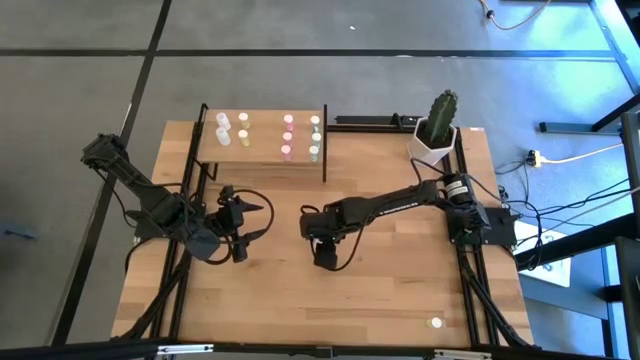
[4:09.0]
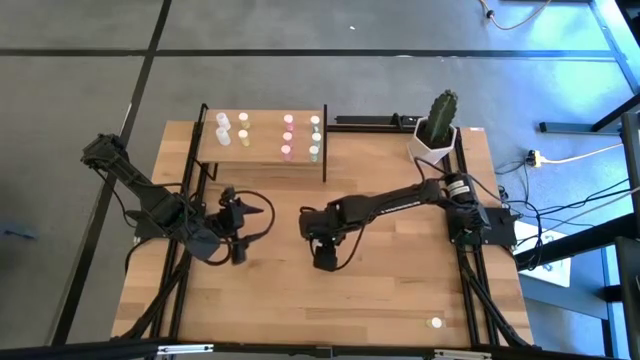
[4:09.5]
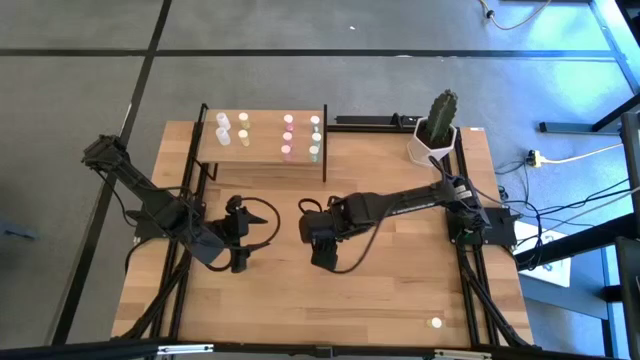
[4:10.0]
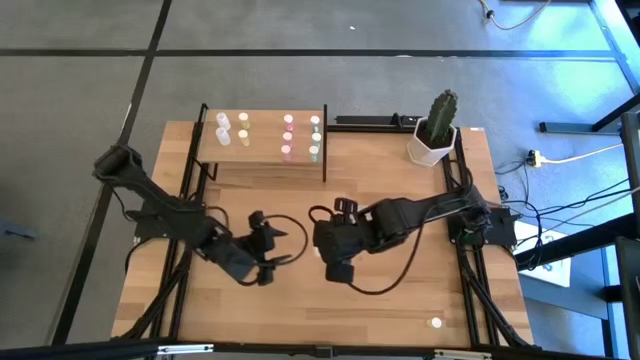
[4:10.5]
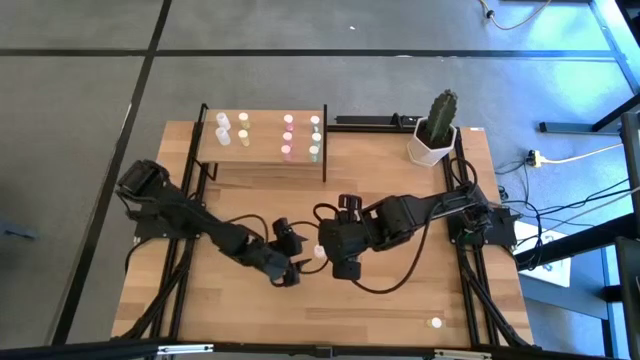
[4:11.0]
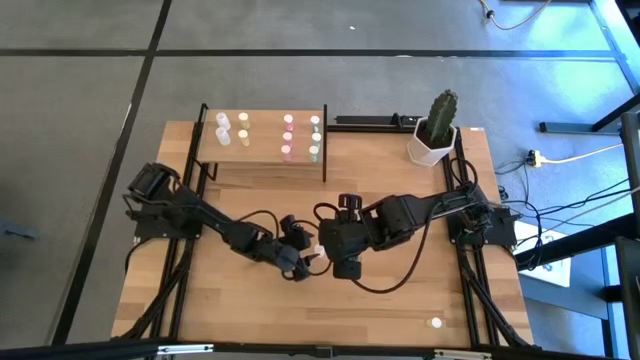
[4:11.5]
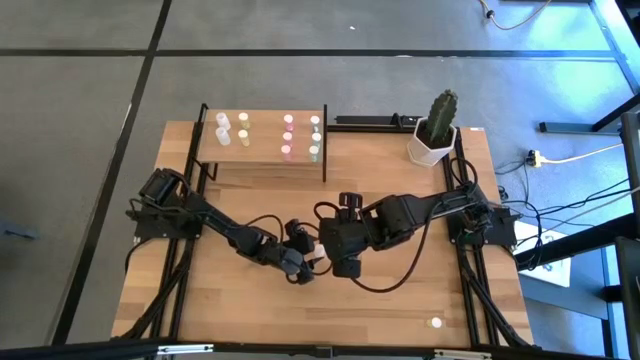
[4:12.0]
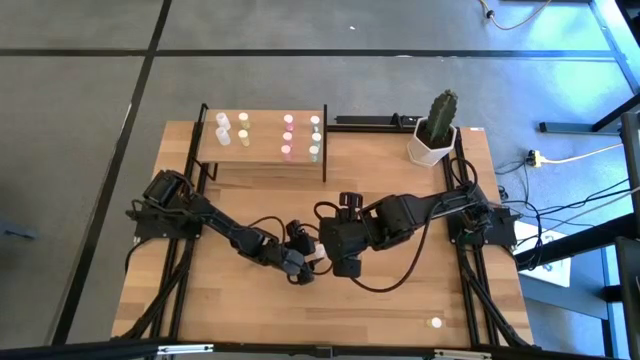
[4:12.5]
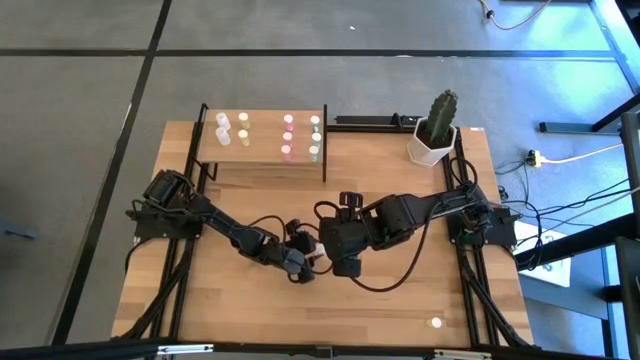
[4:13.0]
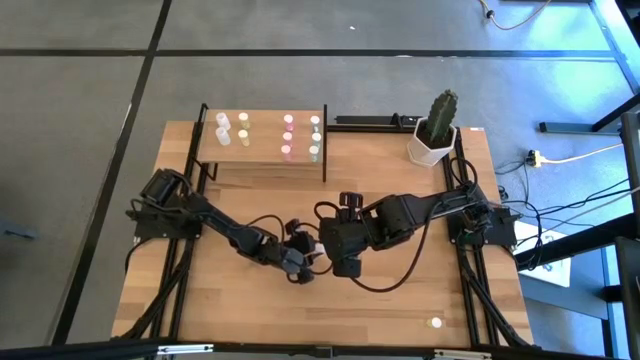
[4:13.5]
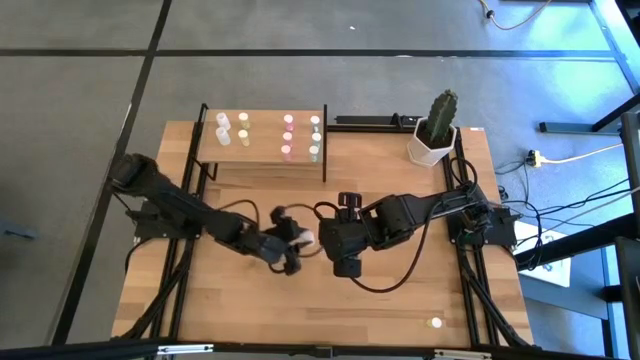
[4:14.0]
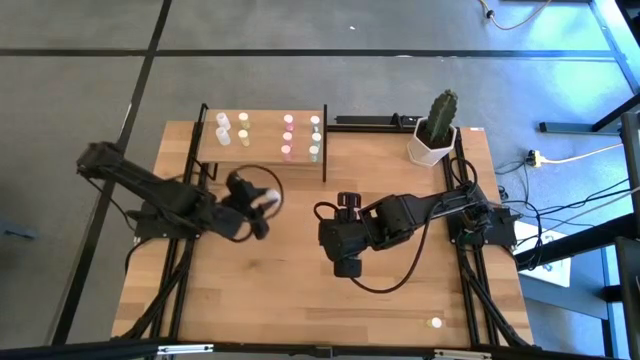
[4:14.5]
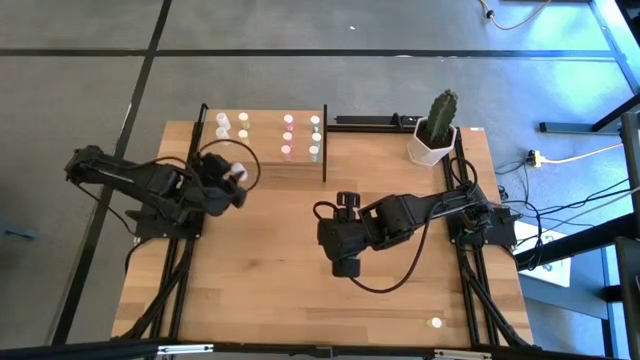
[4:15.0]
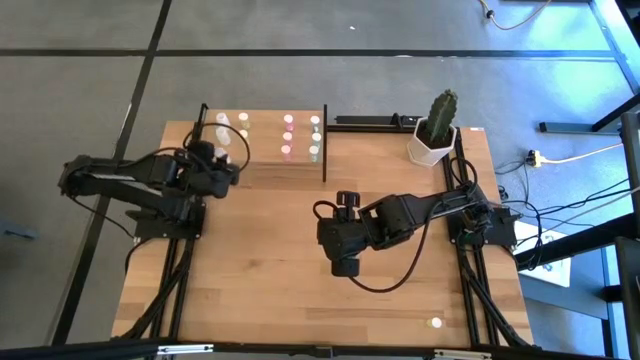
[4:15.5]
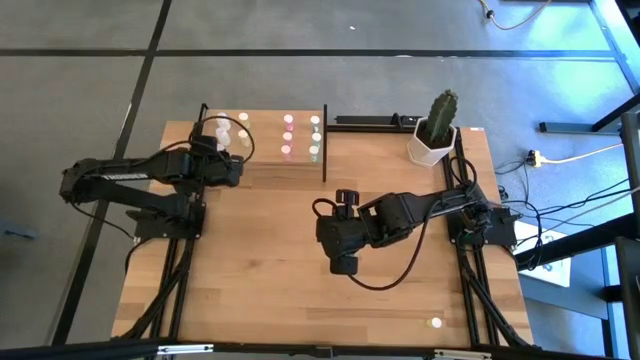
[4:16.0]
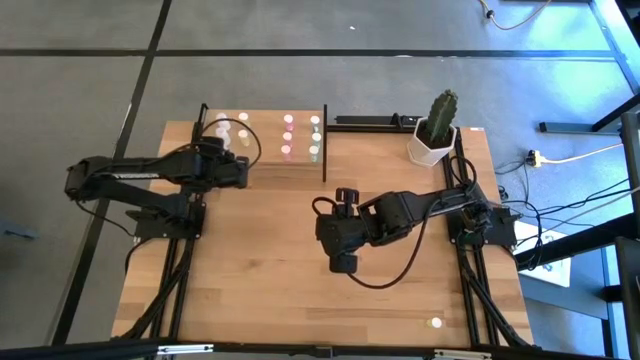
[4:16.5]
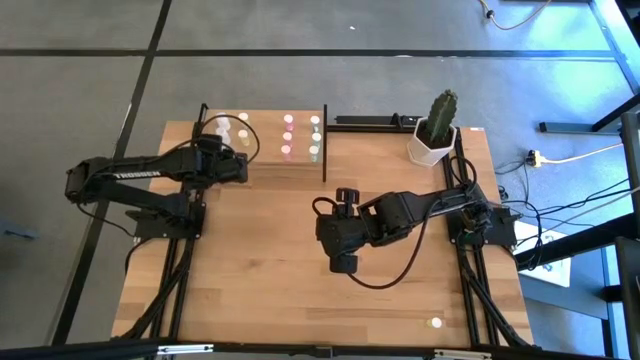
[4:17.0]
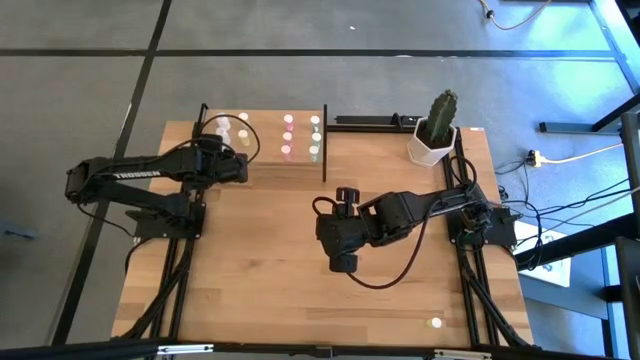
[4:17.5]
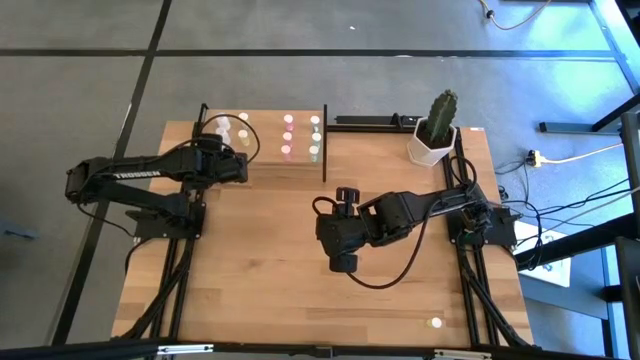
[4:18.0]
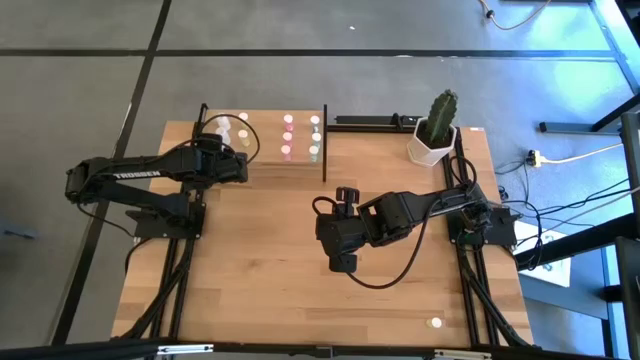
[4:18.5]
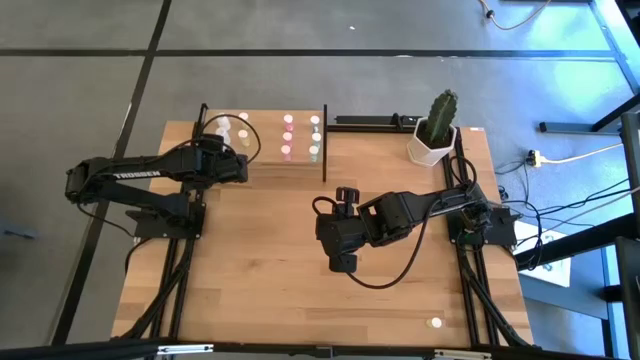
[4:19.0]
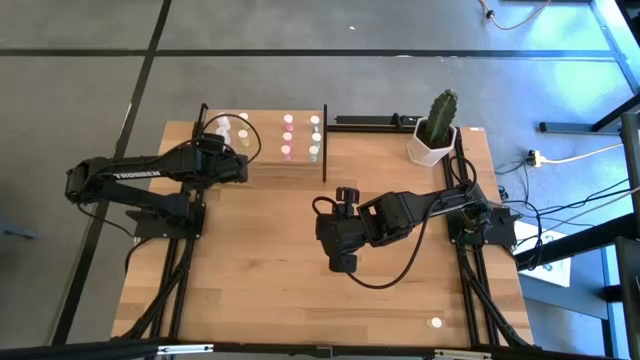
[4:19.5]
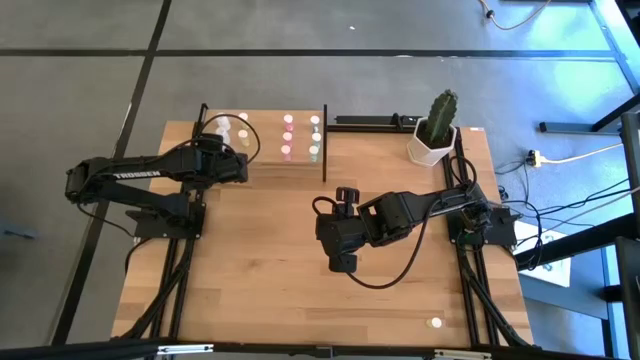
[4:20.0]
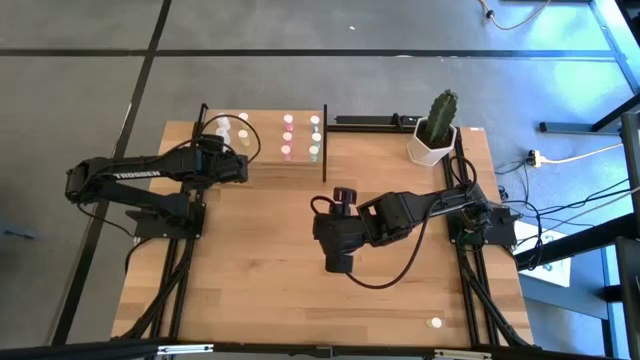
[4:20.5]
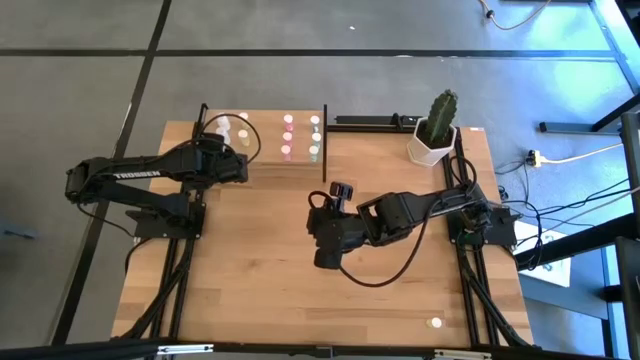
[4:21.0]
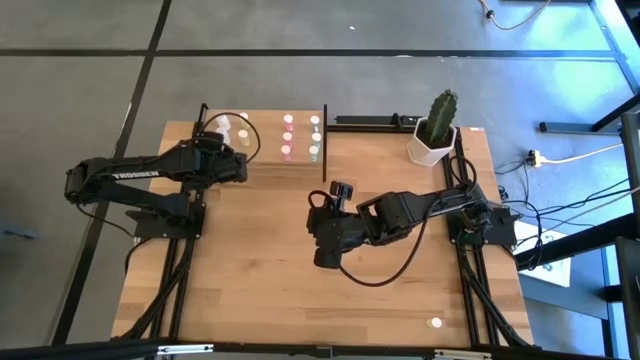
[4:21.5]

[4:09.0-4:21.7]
Task: Pick and place medicine bottles onto shelf by color
Put the white pill bottle on the shelf and align it with the other white pill bottles

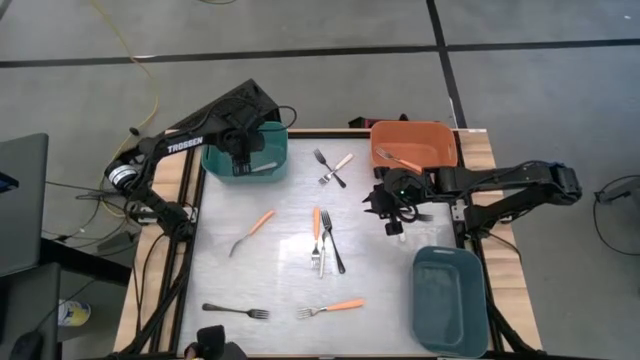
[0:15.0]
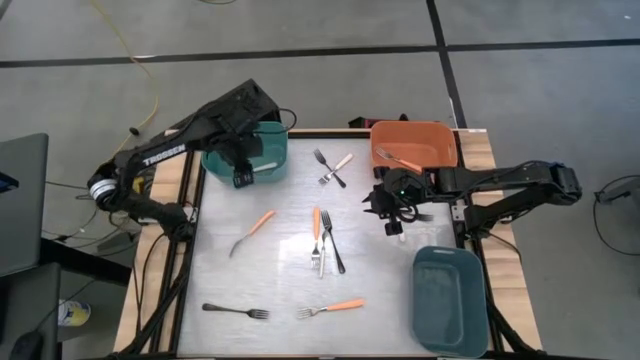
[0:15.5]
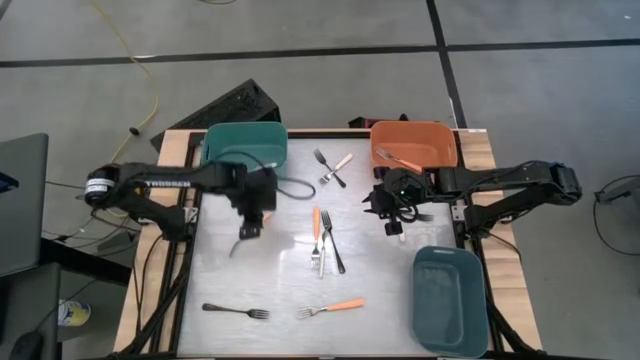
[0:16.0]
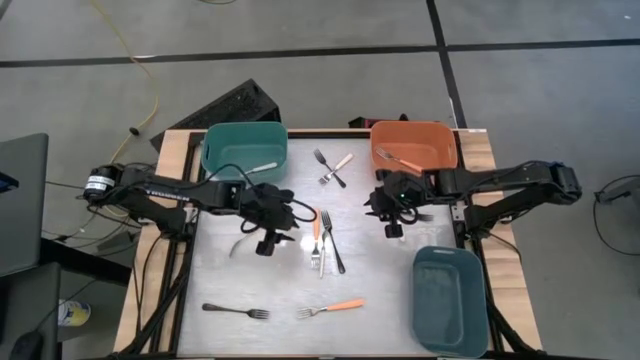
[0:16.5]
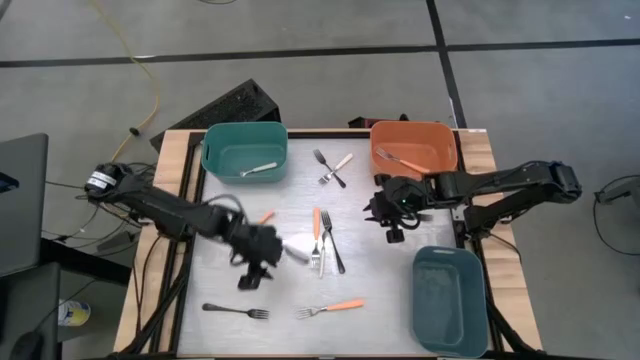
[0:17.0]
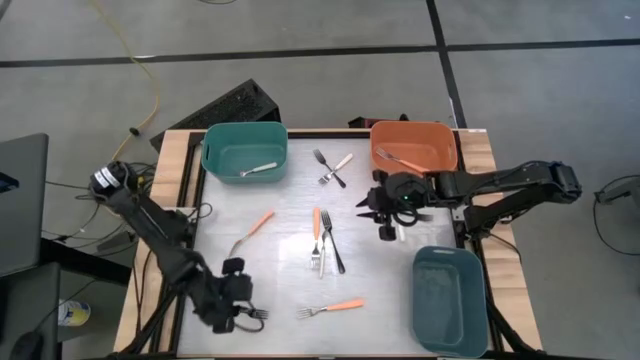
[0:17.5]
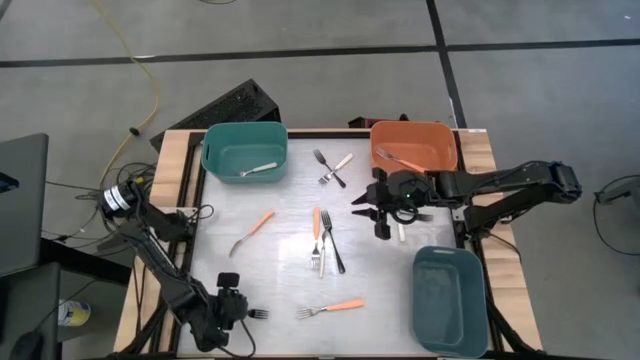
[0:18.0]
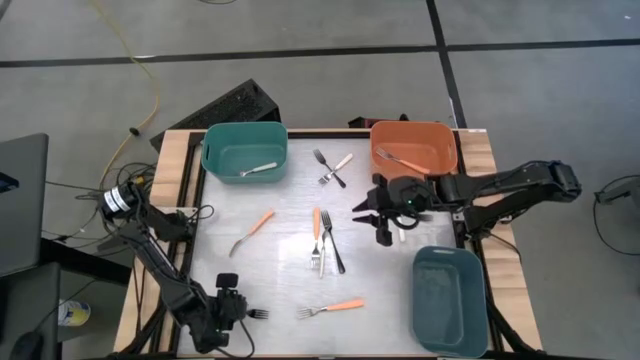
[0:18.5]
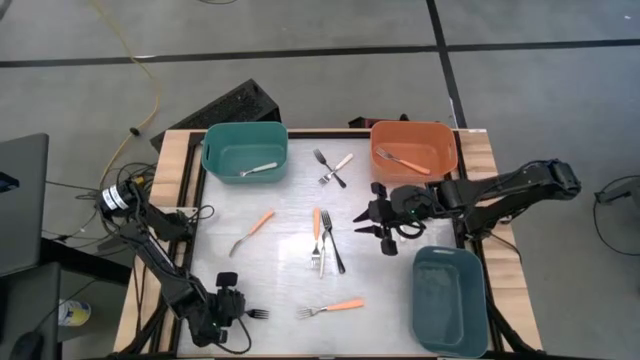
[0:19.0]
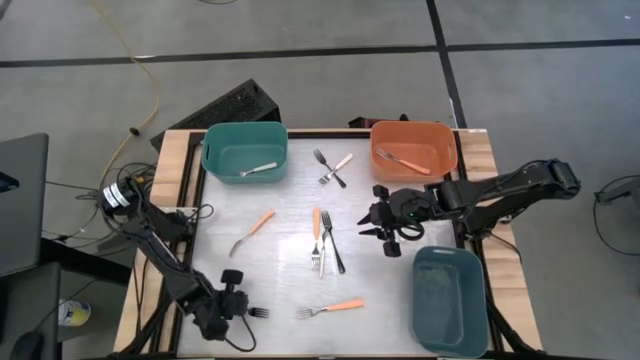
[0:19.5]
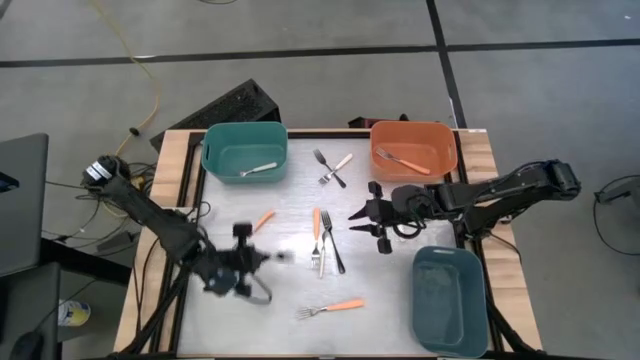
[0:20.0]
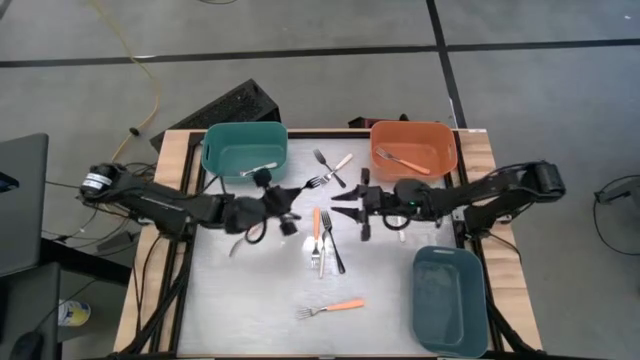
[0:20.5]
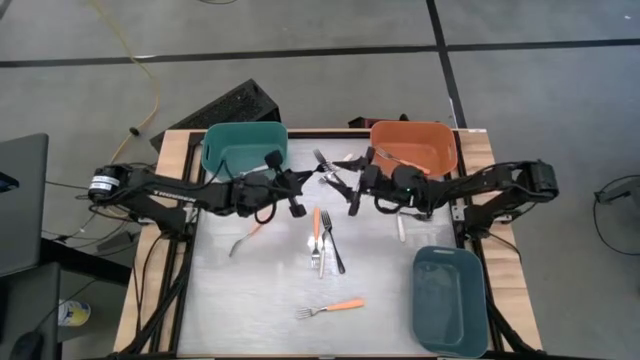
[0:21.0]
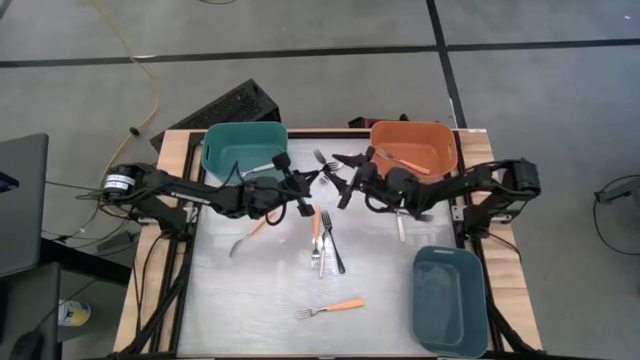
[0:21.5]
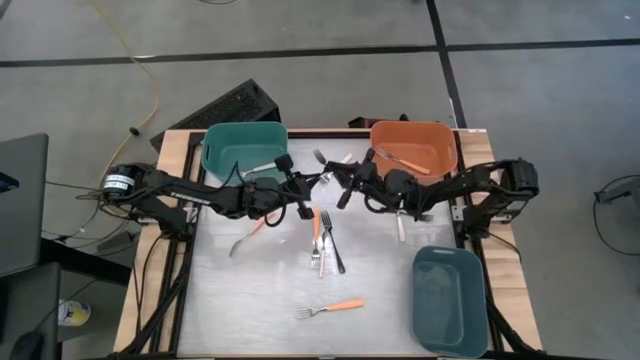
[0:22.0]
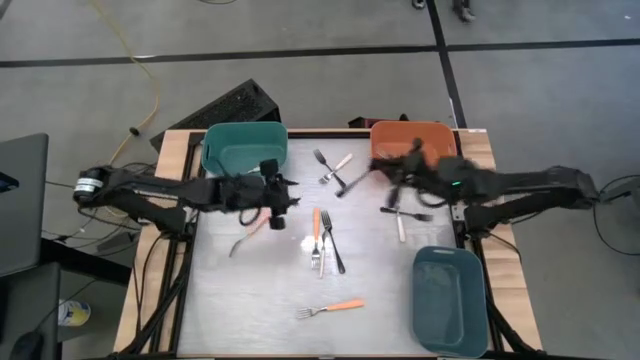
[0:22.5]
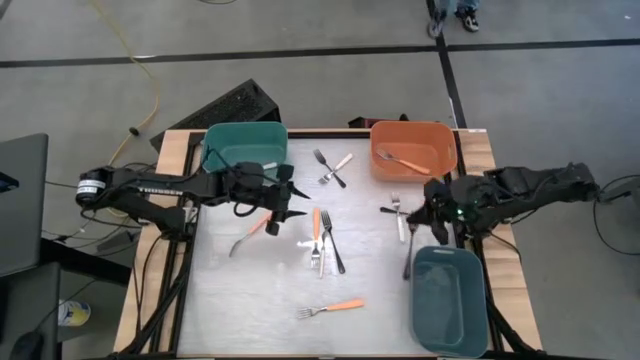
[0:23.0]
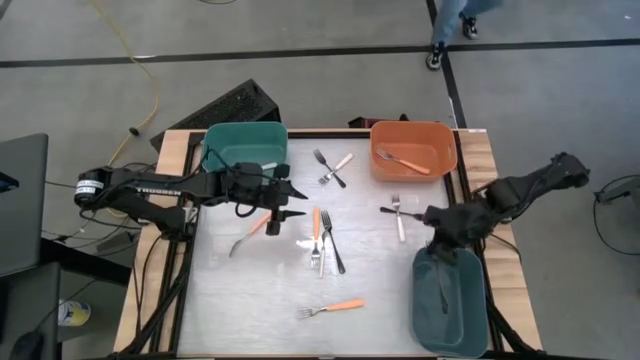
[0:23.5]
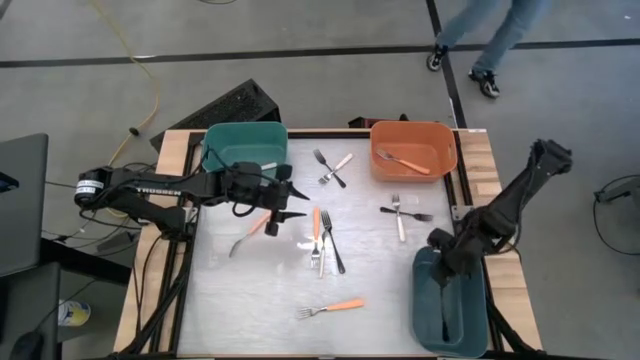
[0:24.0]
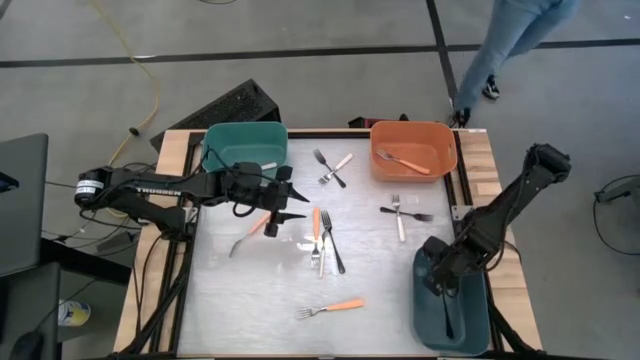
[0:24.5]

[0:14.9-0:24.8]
Task: Sort silverware by color (type)
Put the bottom left black fork into the gray bin
